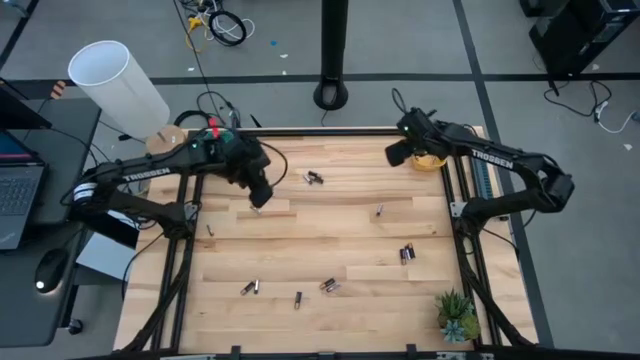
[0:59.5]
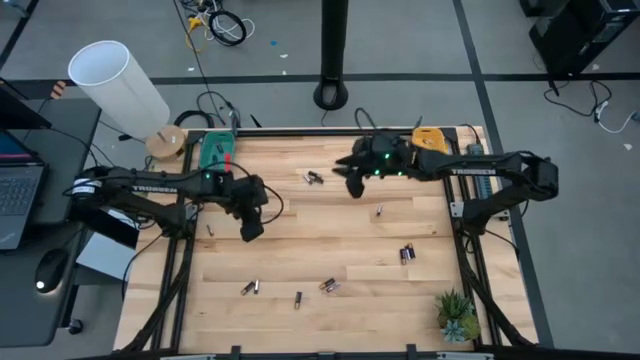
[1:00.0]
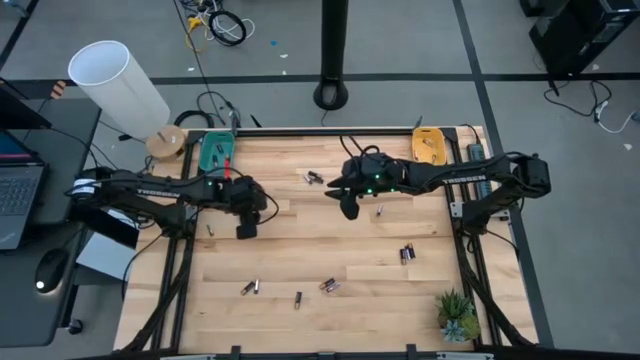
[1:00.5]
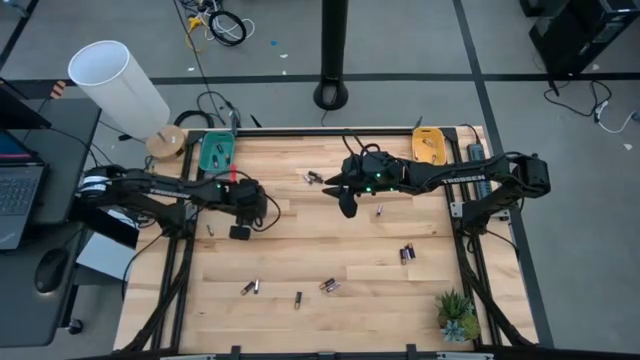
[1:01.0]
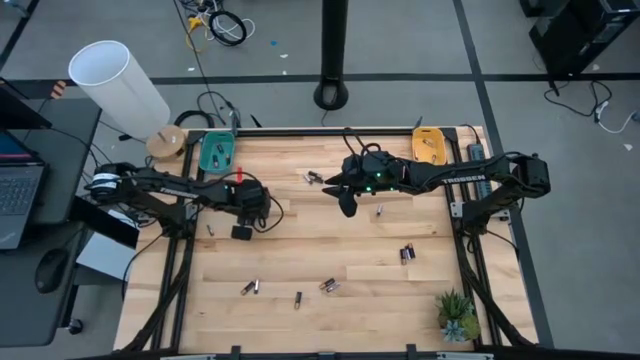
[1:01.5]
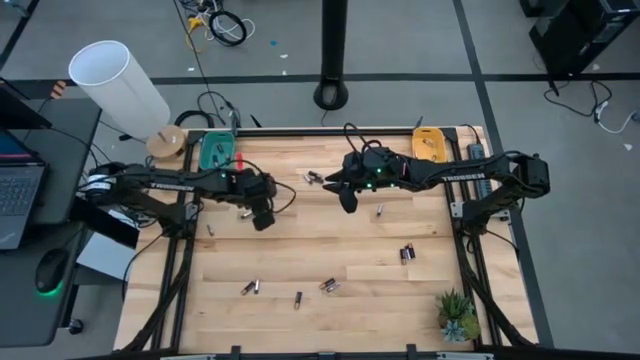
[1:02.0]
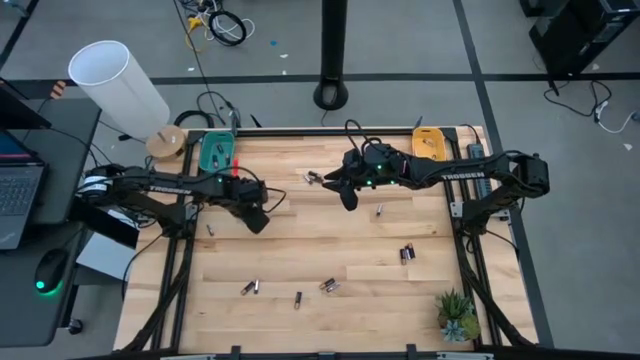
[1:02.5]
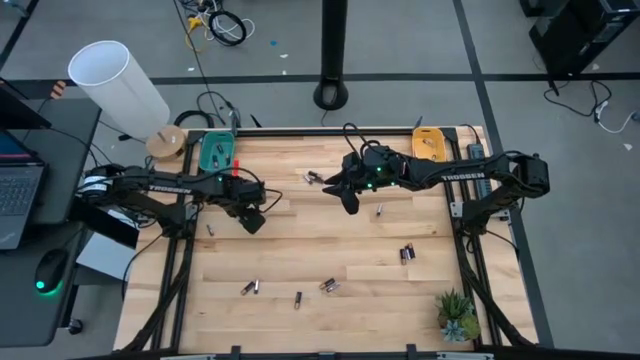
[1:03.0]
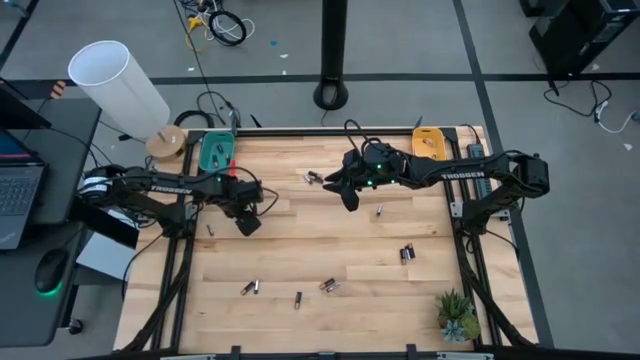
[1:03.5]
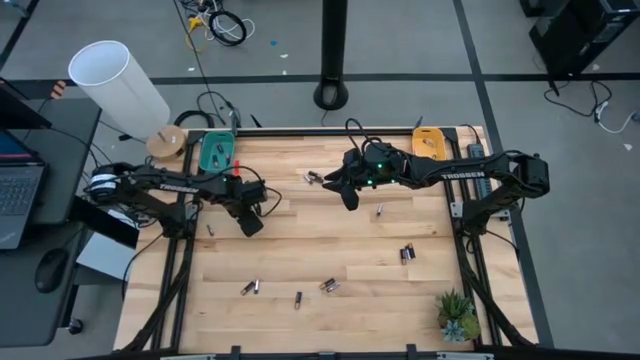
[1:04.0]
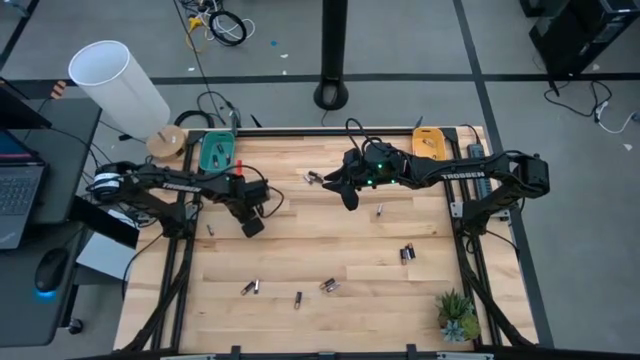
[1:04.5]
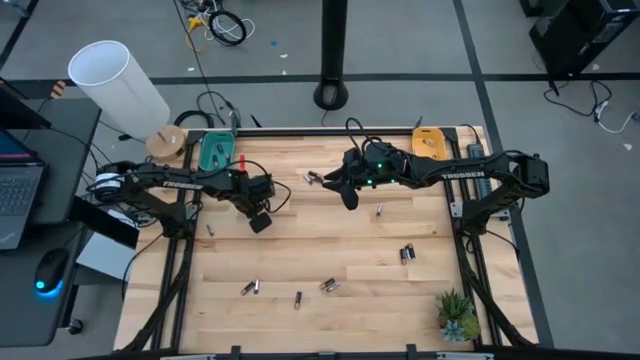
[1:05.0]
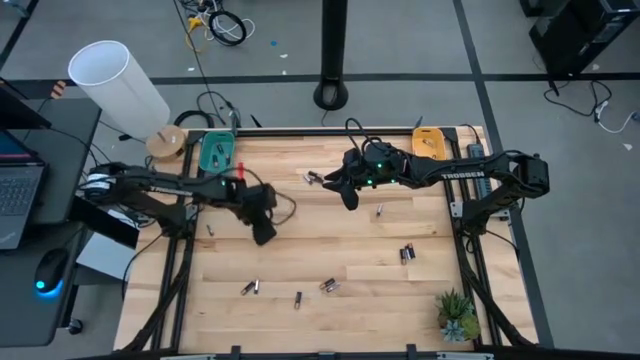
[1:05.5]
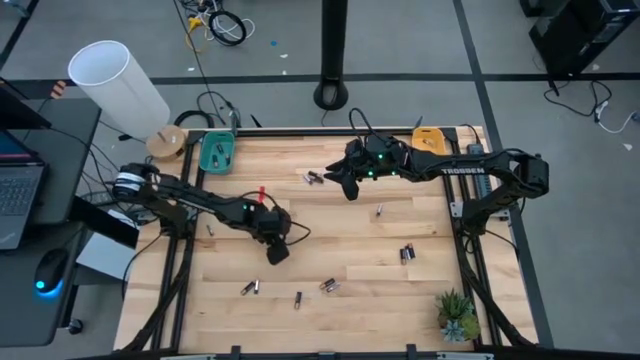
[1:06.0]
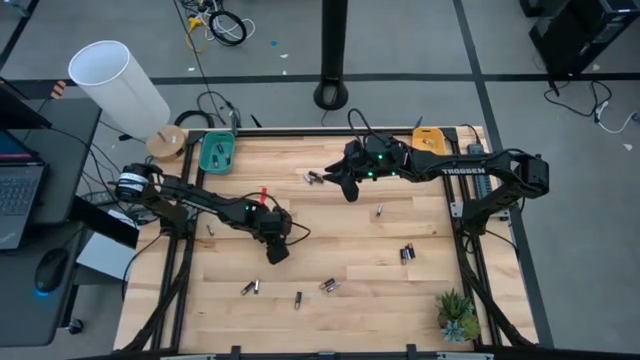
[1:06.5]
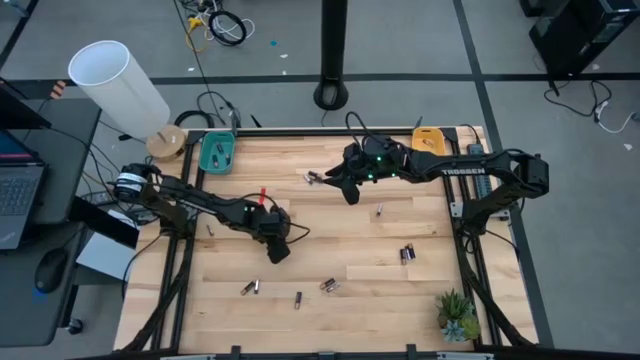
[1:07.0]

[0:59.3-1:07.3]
Task: Sort batteries
Put the silver battery into the yellow bin

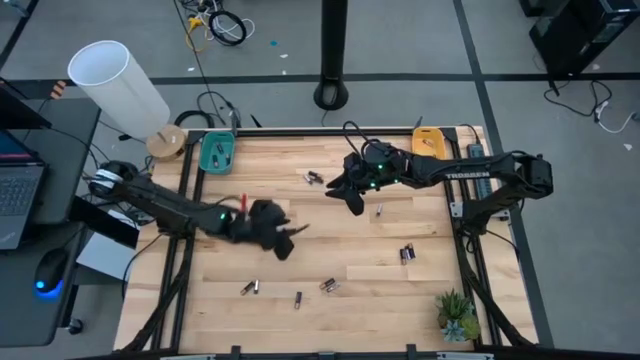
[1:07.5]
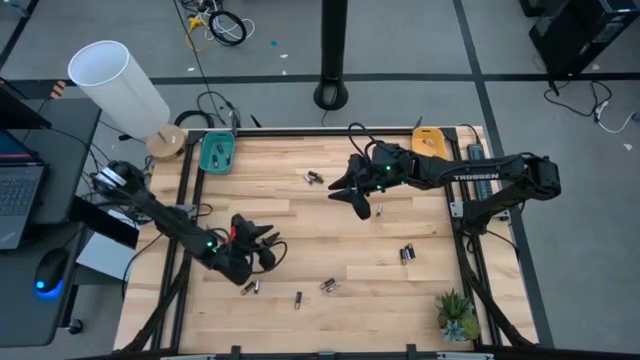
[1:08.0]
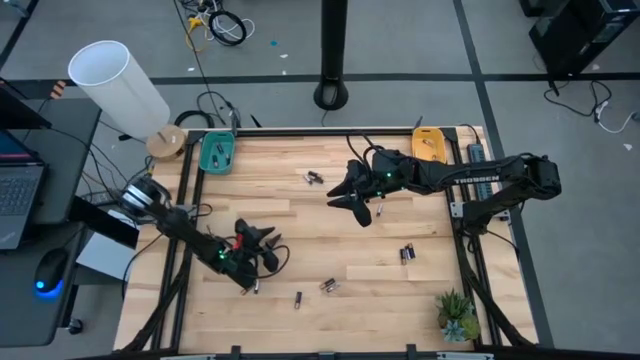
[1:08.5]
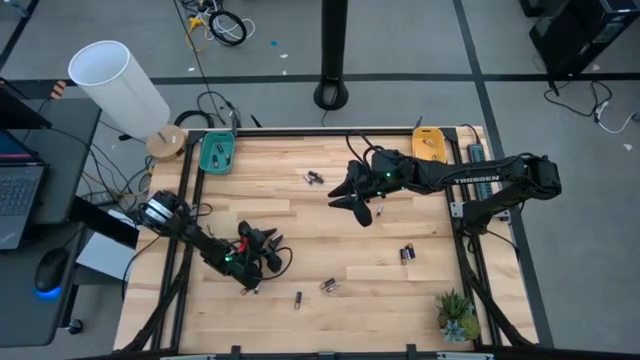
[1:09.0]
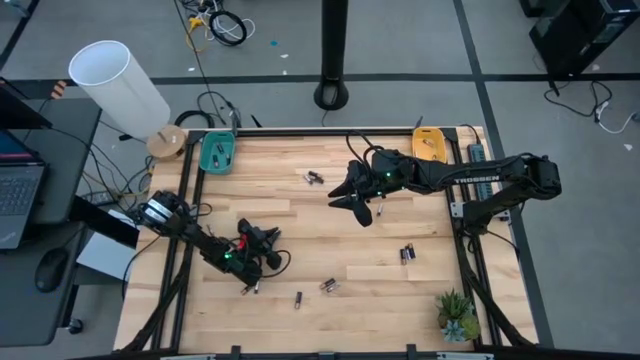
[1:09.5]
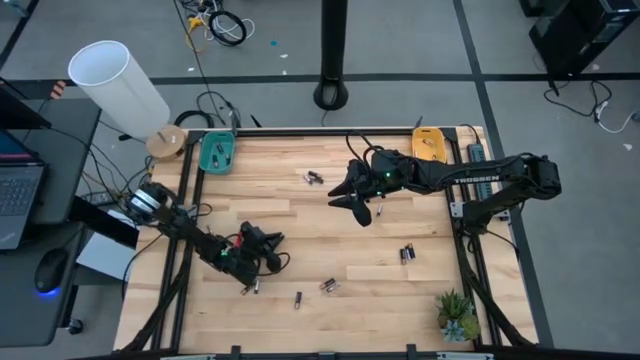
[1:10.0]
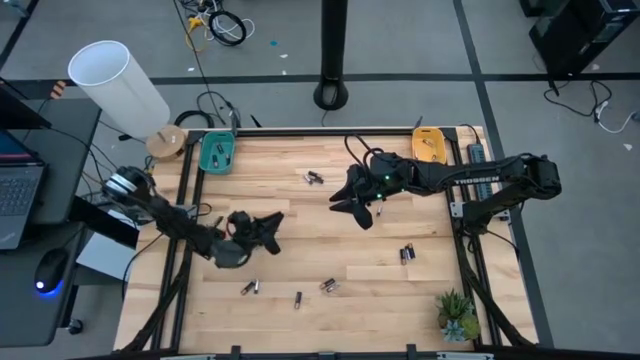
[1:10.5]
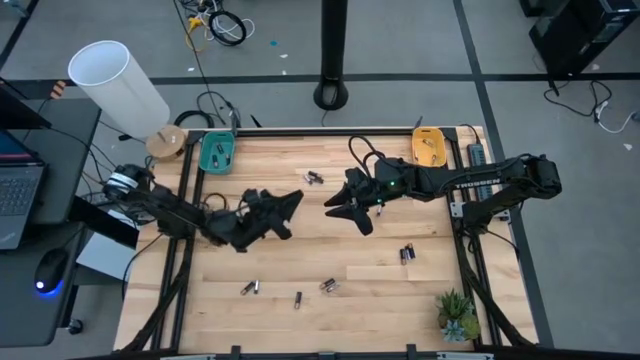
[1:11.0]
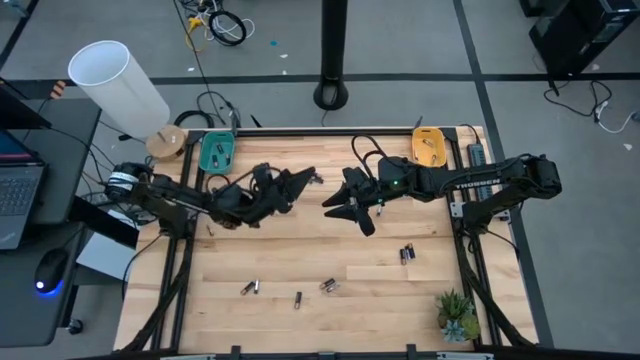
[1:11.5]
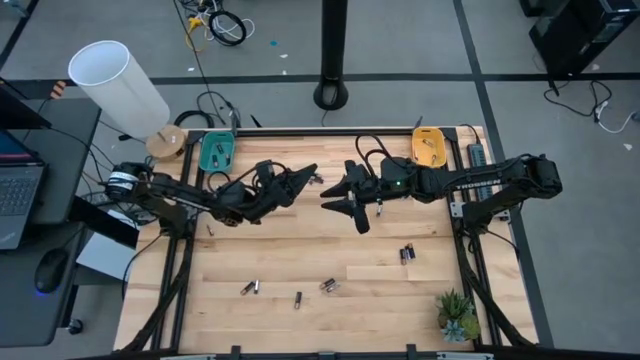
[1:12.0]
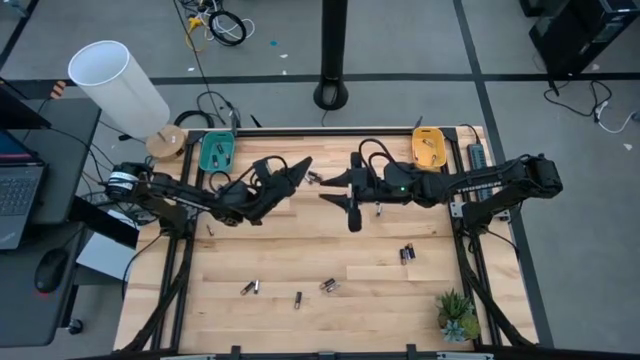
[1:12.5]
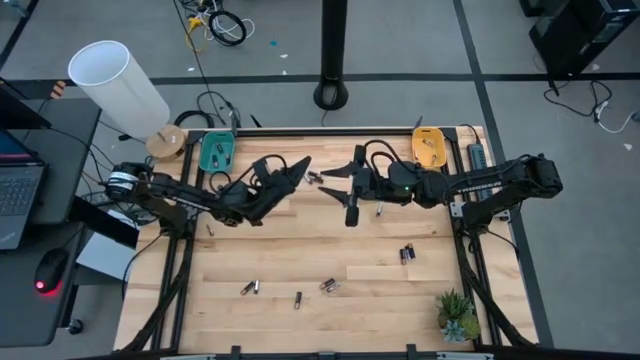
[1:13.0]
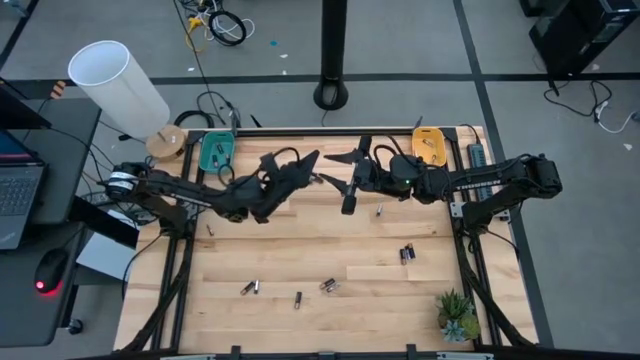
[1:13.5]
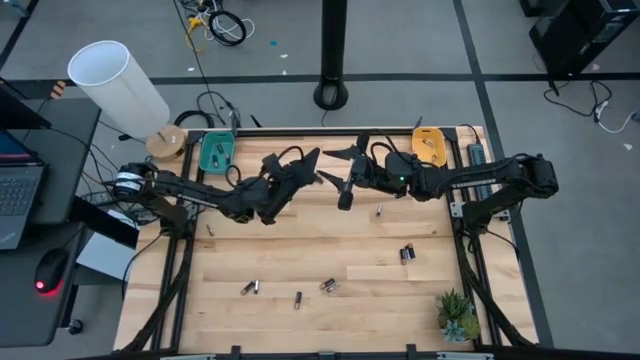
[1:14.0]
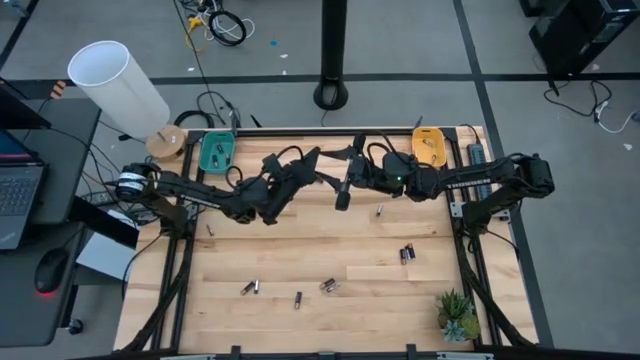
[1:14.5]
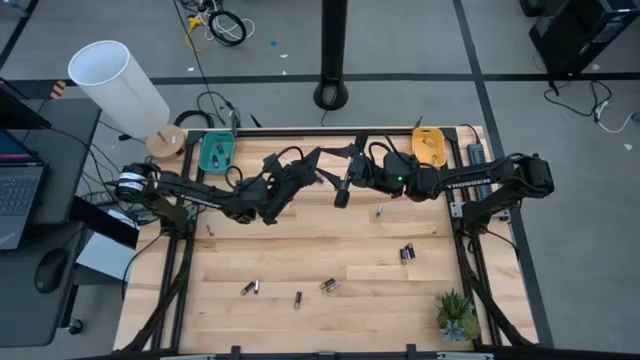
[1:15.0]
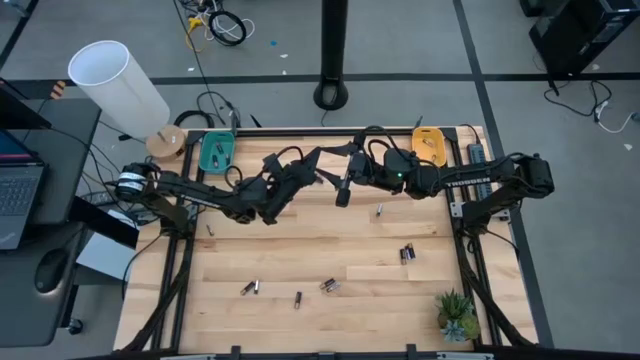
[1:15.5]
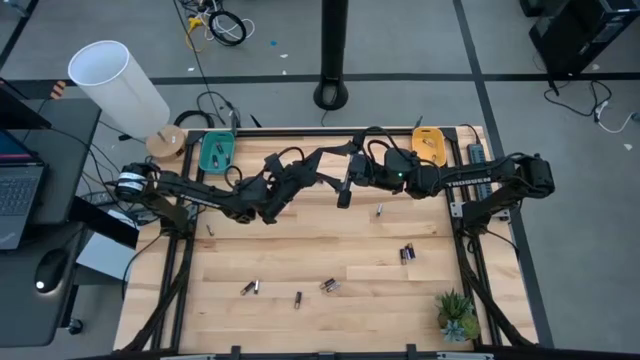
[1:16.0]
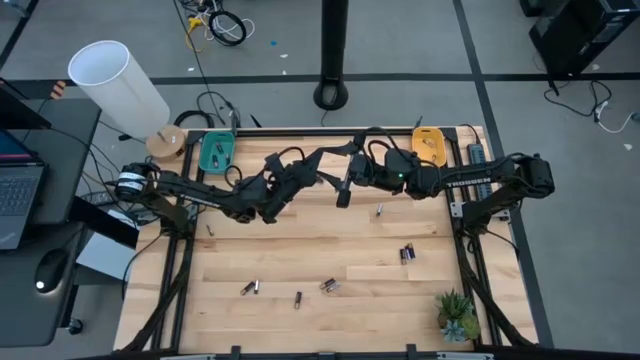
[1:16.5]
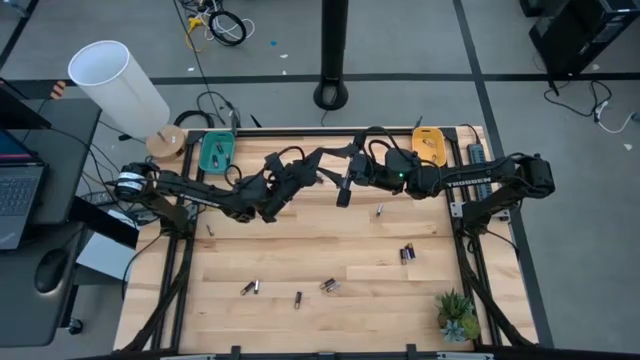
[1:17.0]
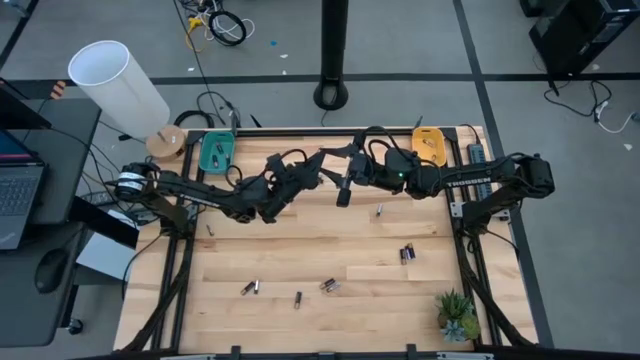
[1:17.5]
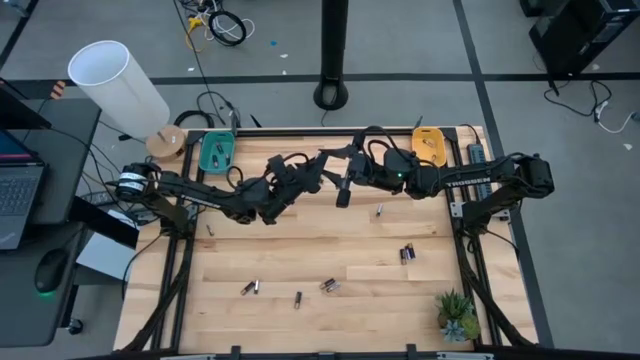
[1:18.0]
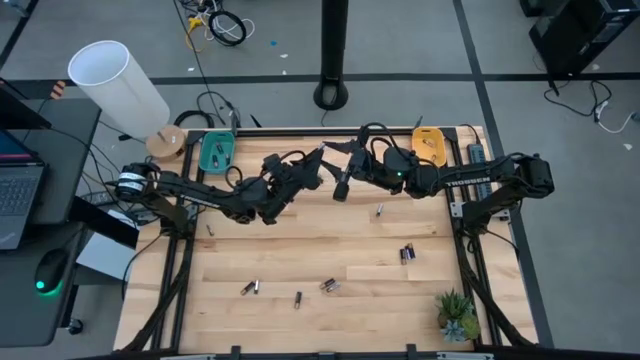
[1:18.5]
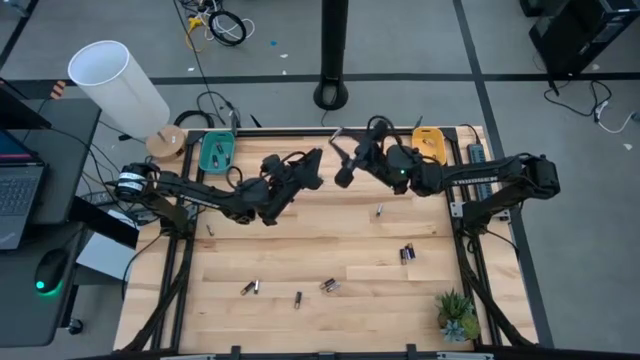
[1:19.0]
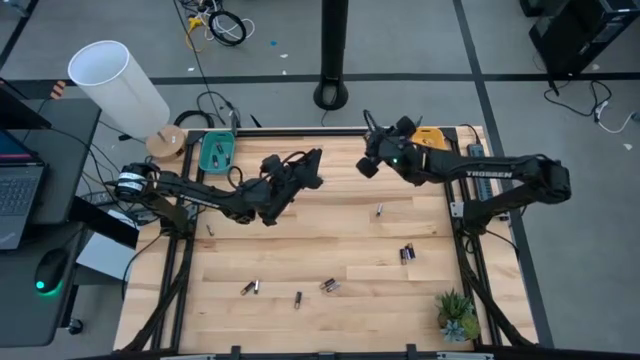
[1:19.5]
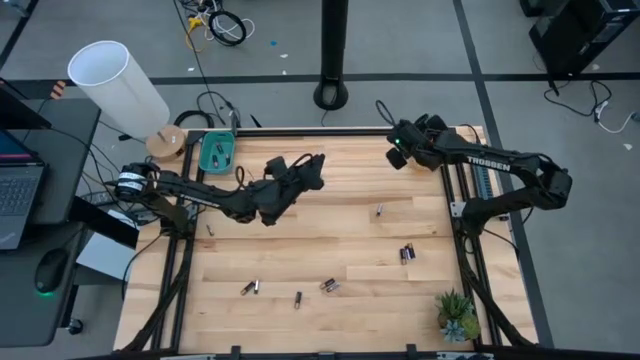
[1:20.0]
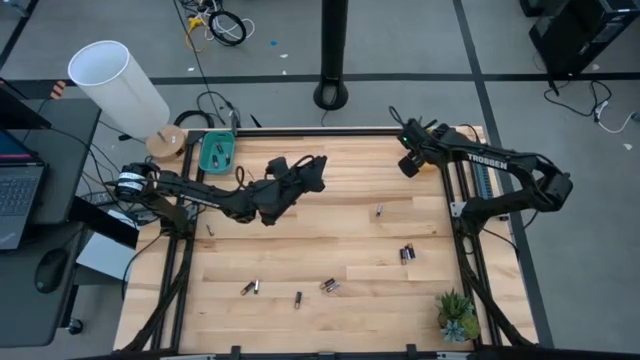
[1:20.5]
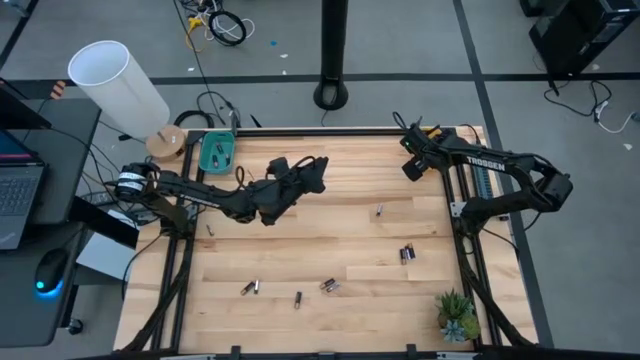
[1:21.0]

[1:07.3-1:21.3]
Put the silver battery into the yellow bin
